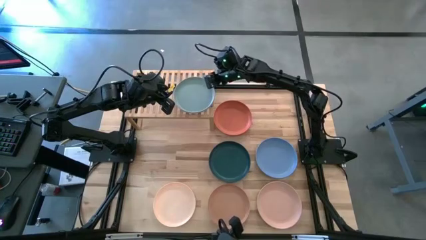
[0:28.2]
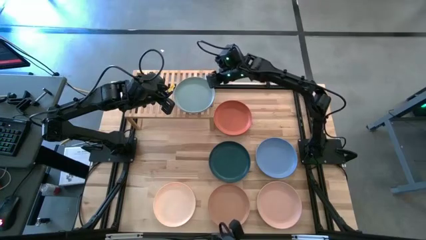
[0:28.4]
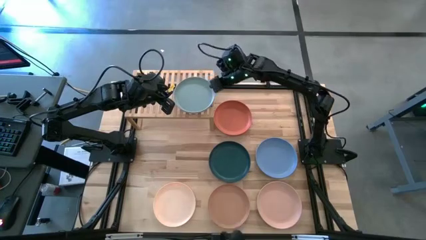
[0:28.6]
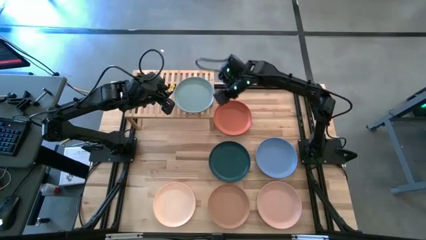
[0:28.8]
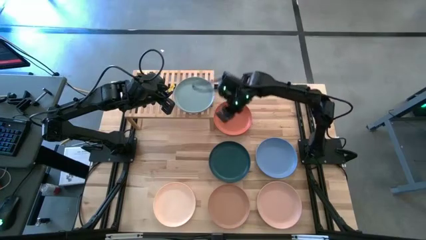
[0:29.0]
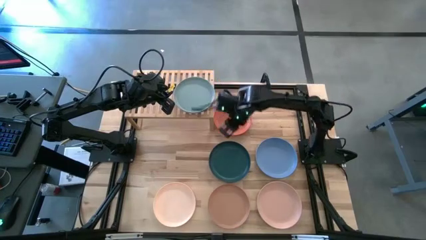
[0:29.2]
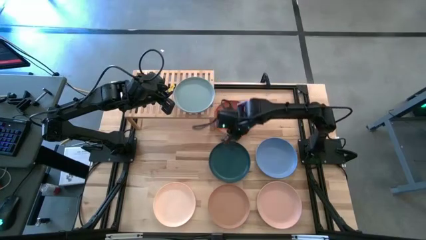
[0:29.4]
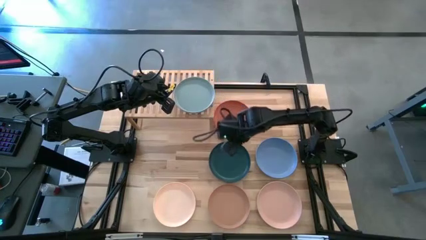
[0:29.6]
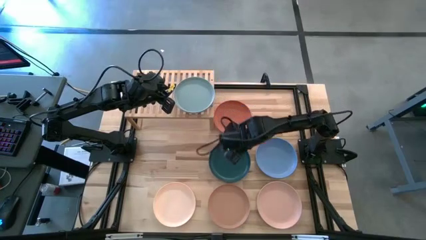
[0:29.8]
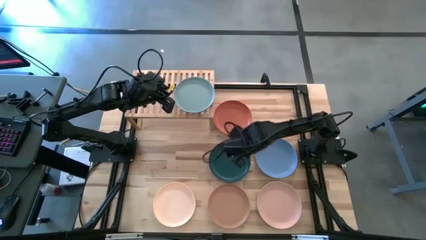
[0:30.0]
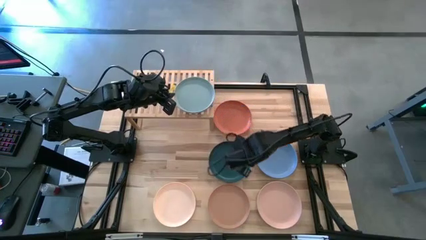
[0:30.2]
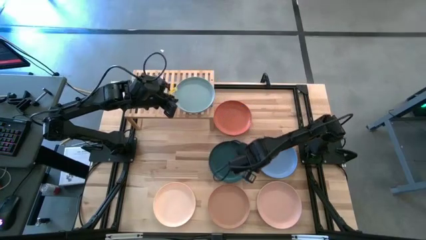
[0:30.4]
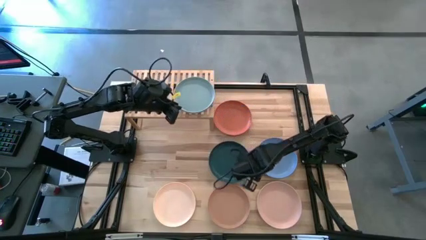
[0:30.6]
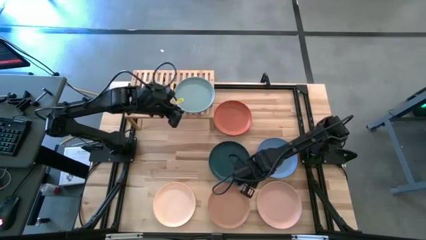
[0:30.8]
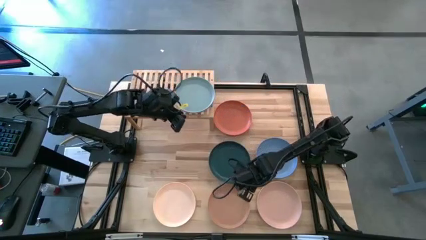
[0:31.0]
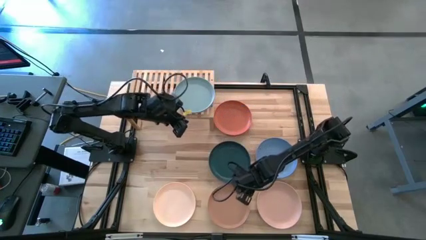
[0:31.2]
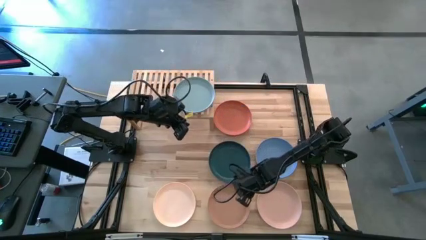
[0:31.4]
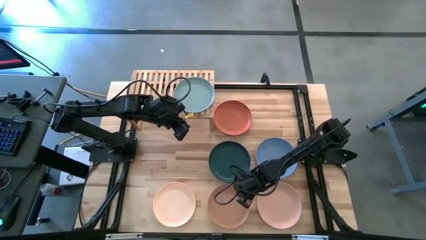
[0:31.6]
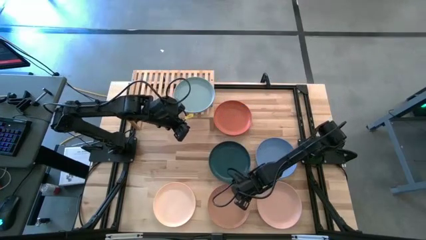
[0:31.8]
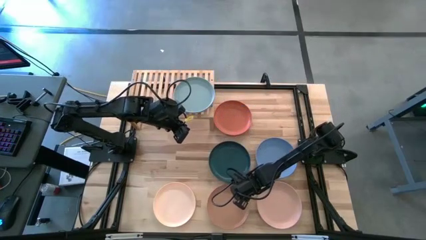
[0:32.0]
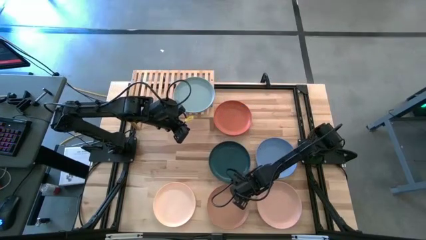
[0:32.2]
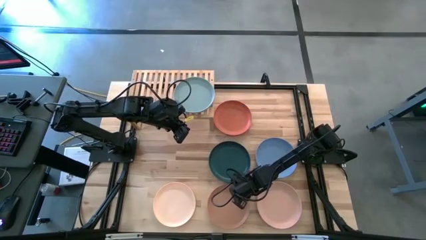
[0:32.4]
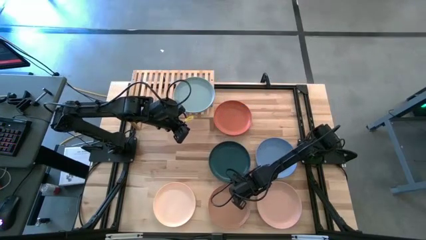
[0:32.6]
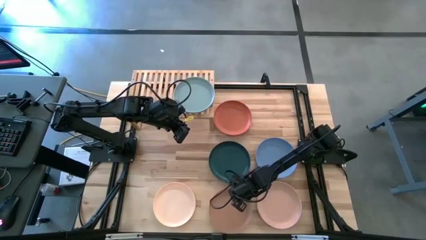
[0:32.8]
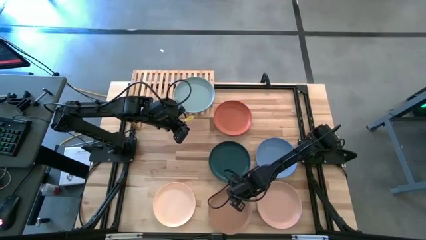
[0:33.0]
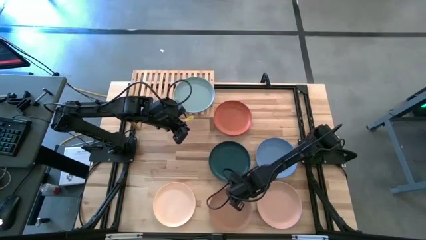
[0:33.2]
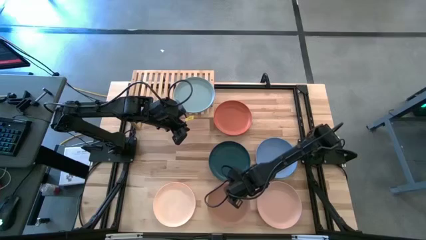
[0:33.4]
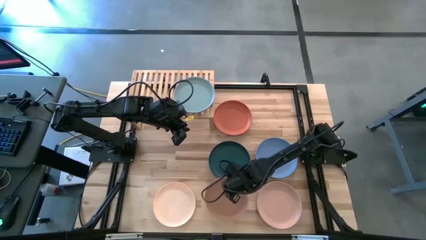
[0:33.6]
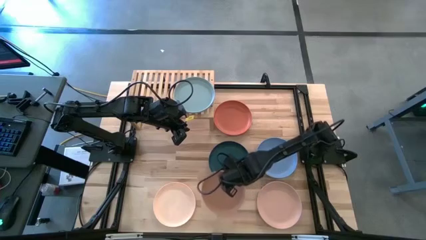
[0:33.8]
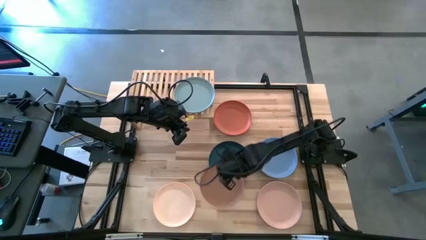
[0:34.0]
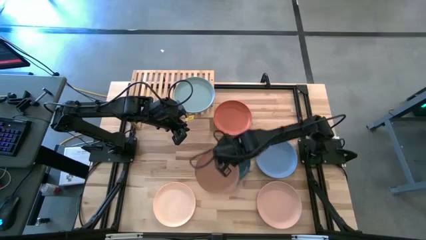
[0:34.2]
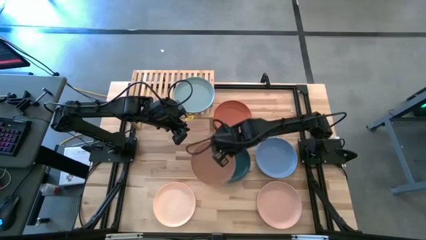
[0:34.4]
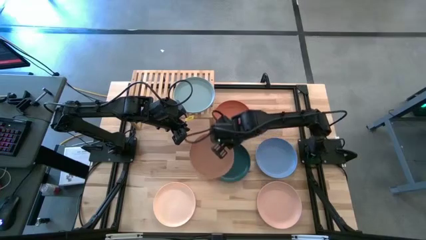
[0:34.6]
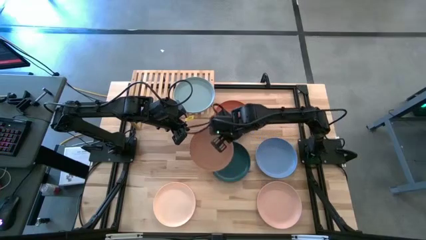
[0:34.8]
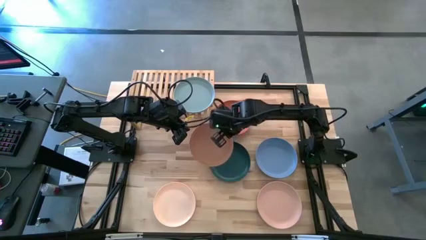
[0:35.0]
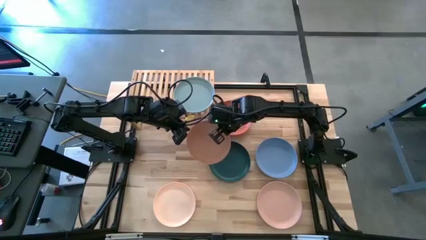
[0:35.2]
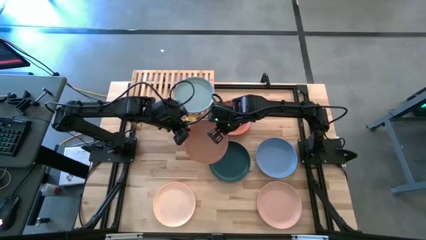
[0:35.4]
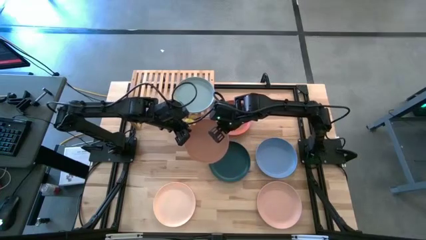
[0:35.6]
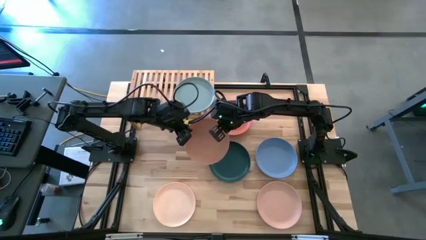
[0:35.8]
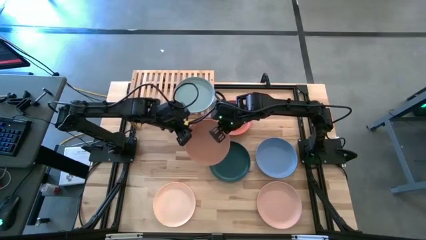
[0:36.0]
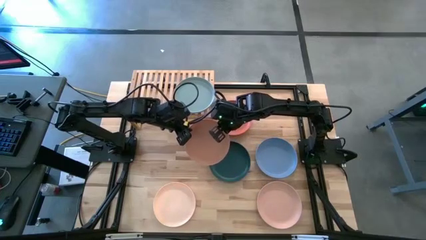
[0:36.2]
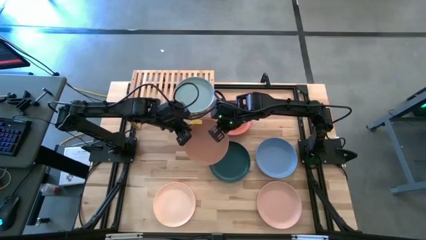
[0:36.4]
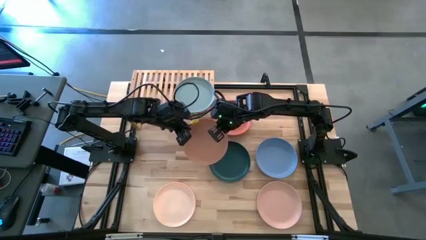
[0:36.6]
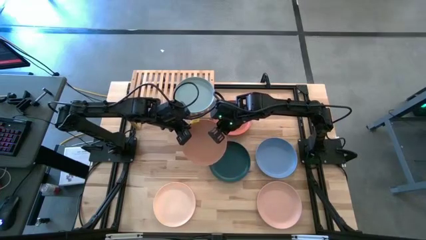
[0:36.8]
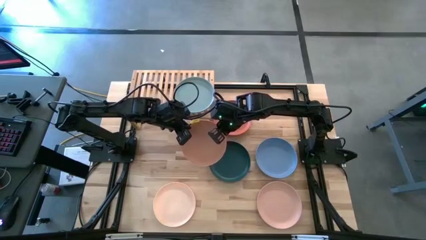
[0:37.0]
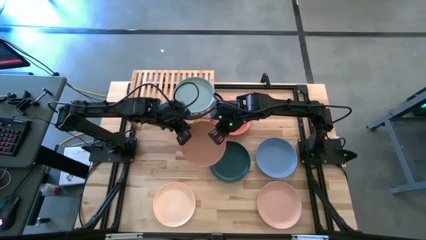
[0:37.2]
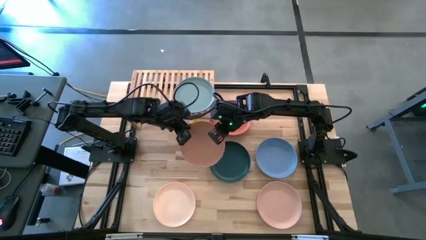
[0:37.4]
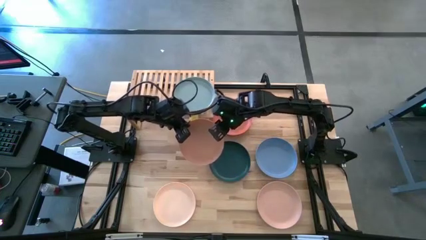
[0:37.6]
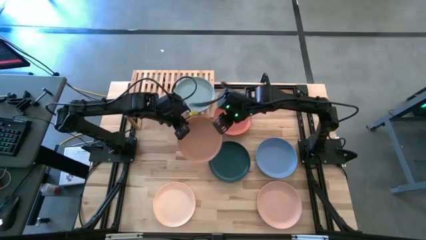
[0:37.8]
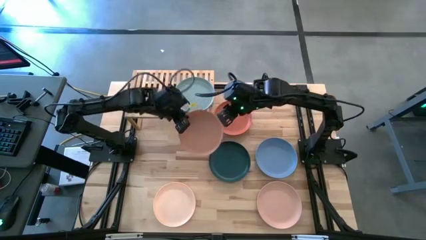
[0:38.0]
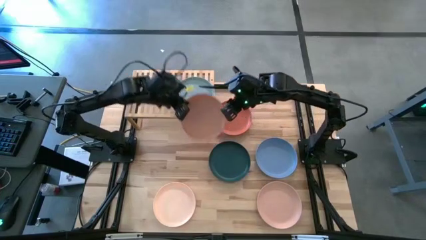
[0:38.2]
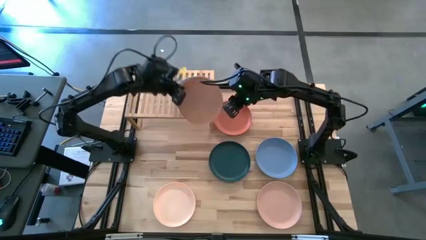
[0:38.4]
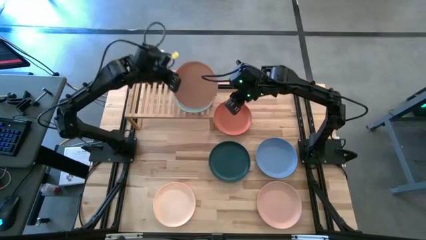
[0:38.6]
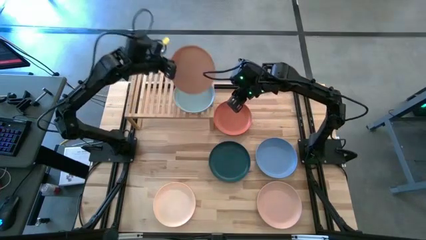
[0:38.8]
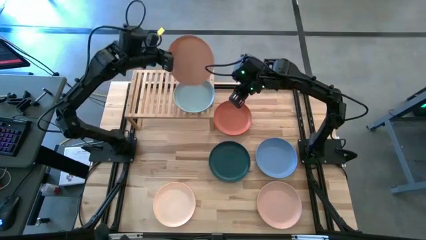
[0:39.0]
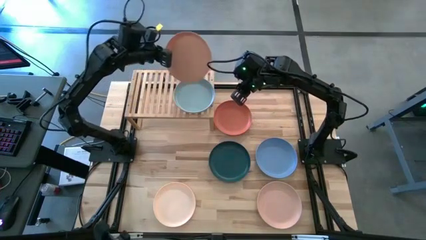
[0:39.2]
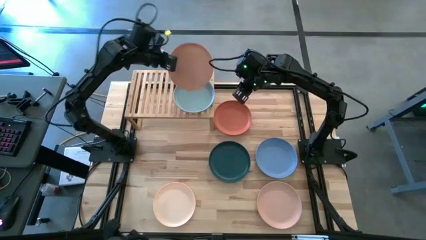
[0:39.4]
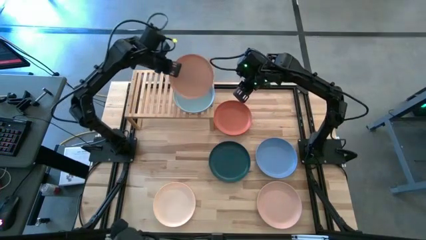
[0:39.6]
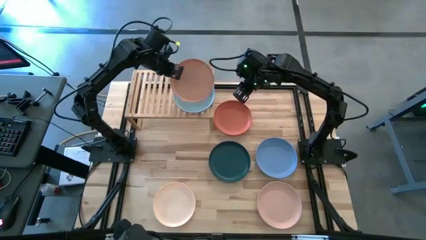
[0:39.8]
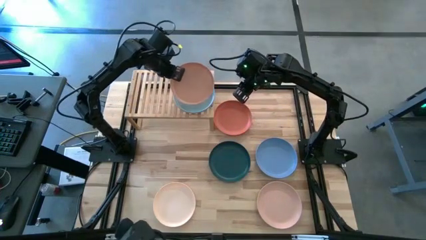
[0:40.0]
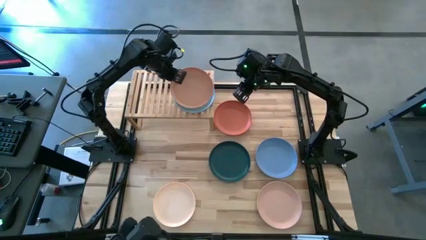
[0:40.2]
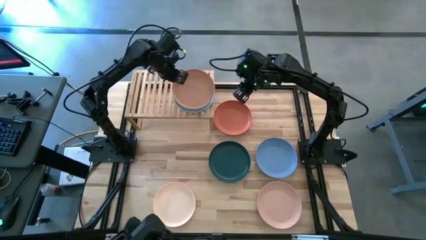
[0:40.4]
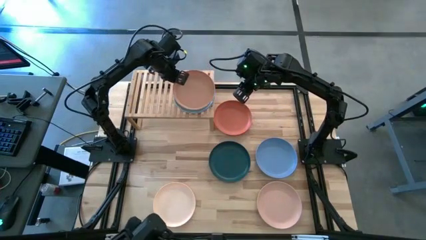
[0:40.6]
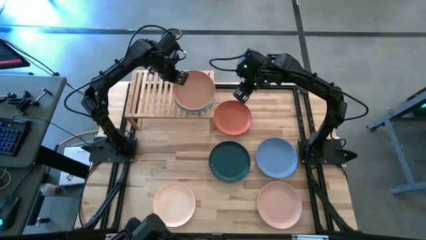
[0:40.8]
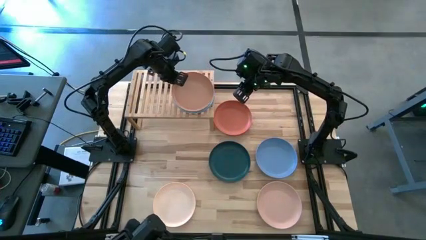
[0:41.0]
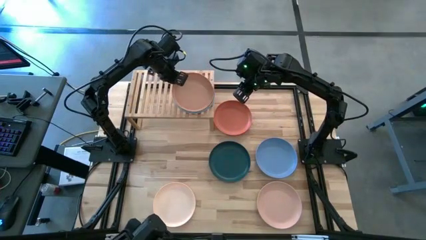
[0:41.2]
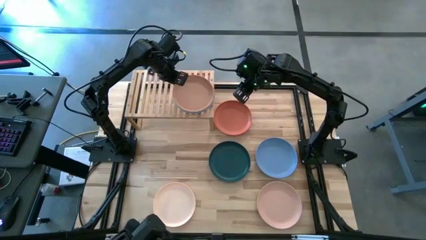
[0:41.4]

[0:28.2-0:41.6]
Task: Place and stack plates onto a shelf
Stack the brown plate on top of the light blue plate on the shelf
